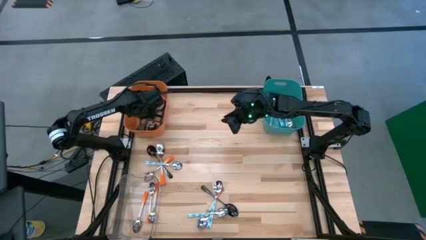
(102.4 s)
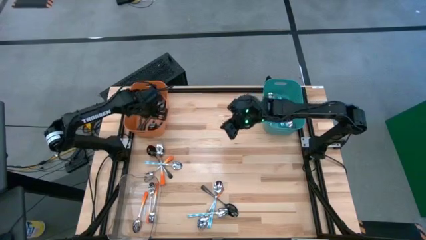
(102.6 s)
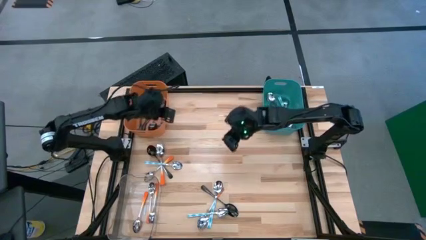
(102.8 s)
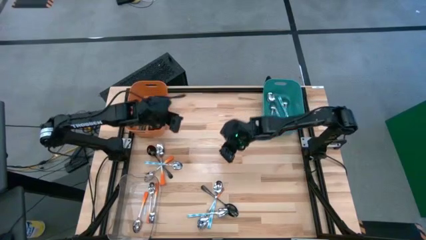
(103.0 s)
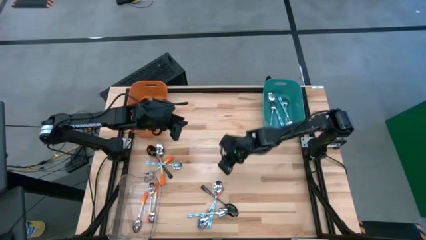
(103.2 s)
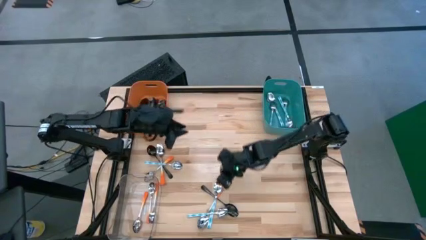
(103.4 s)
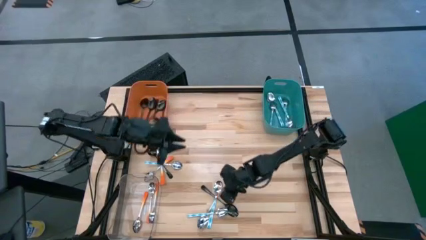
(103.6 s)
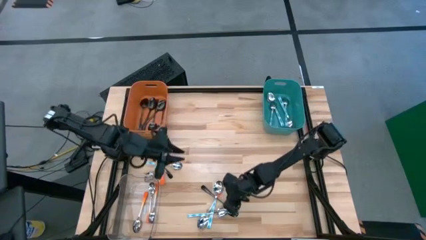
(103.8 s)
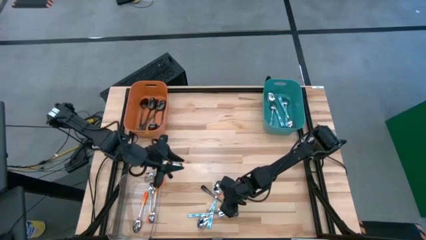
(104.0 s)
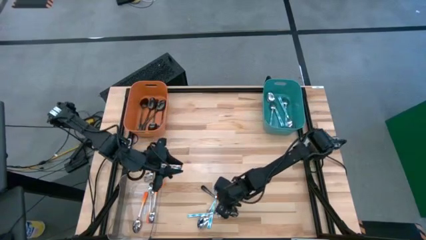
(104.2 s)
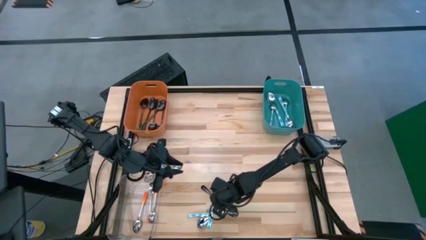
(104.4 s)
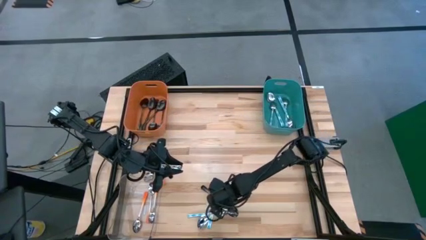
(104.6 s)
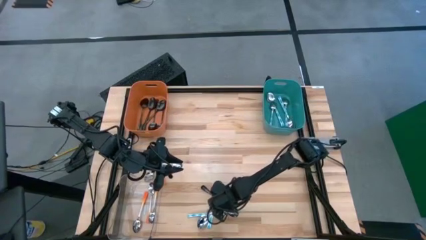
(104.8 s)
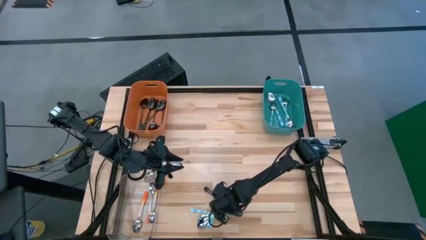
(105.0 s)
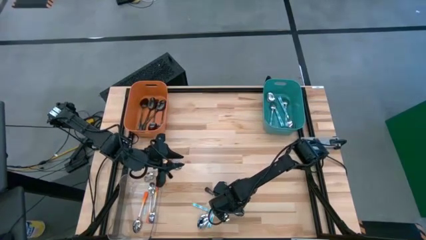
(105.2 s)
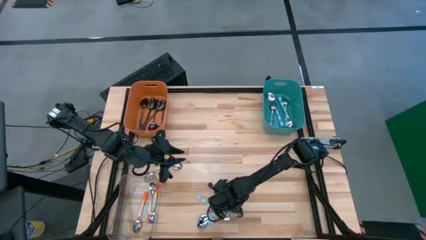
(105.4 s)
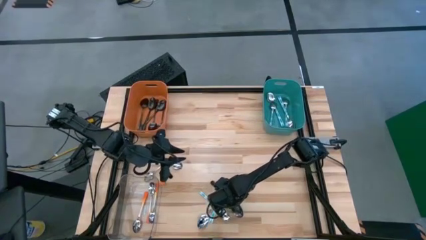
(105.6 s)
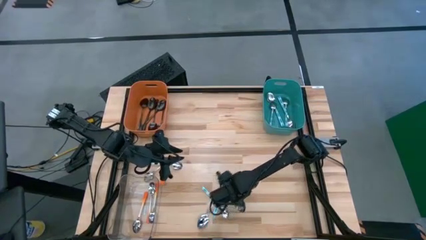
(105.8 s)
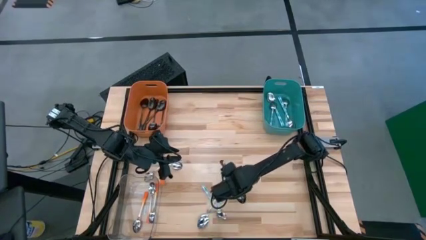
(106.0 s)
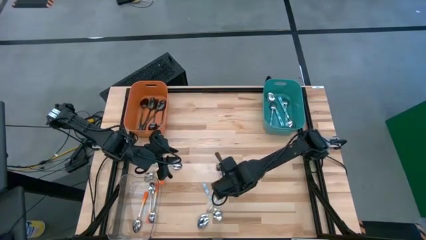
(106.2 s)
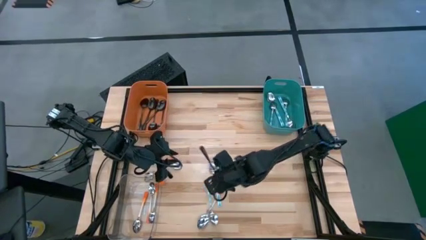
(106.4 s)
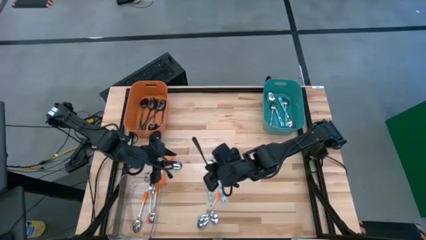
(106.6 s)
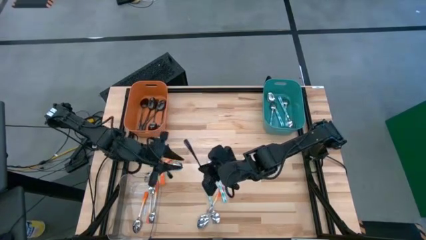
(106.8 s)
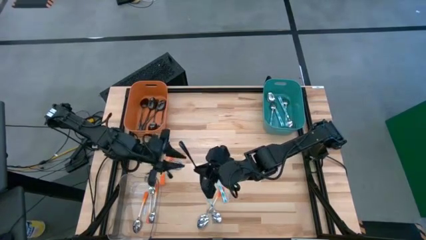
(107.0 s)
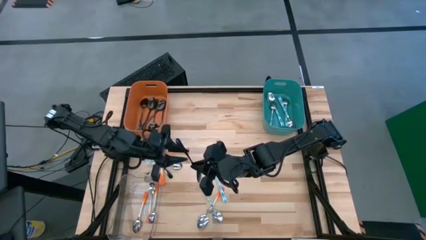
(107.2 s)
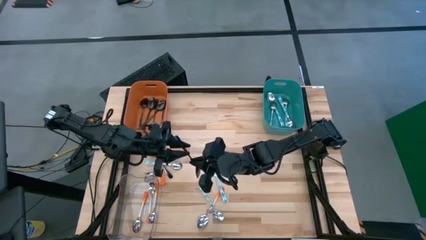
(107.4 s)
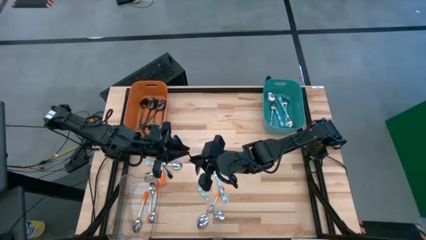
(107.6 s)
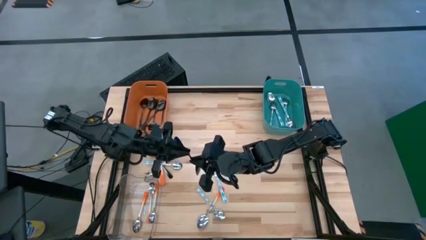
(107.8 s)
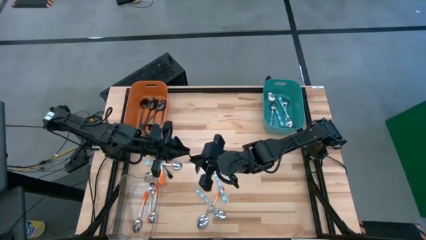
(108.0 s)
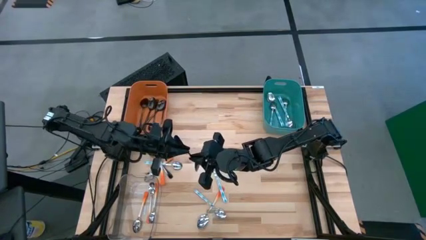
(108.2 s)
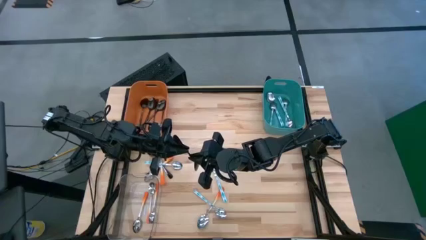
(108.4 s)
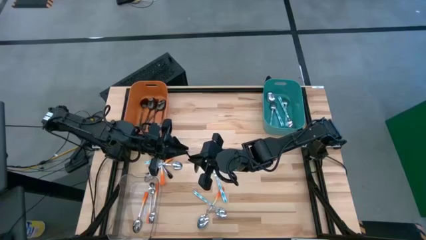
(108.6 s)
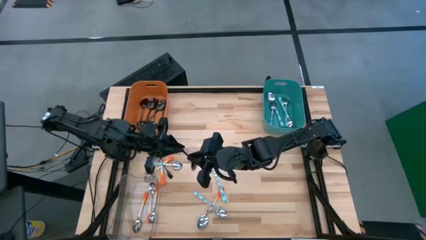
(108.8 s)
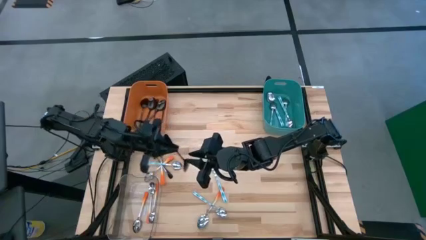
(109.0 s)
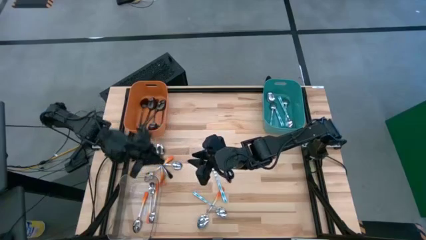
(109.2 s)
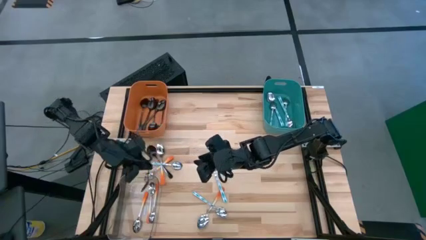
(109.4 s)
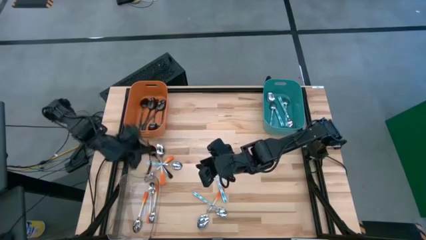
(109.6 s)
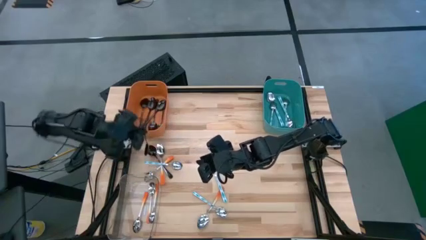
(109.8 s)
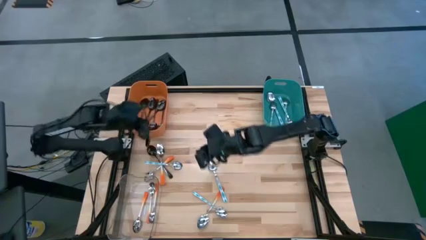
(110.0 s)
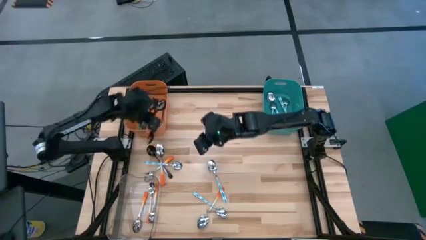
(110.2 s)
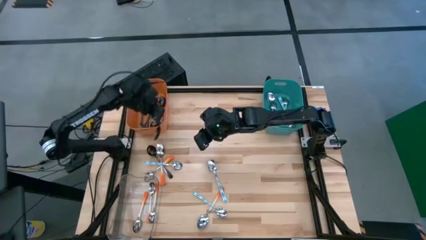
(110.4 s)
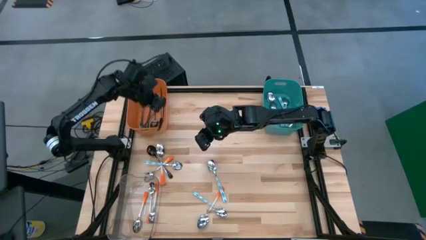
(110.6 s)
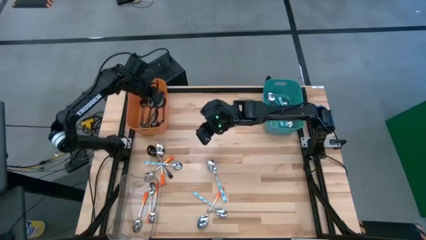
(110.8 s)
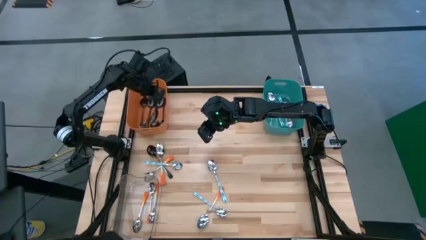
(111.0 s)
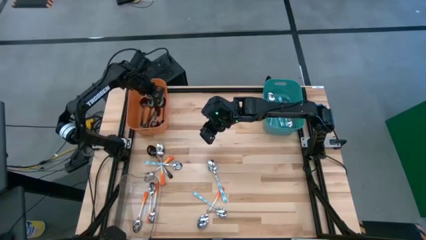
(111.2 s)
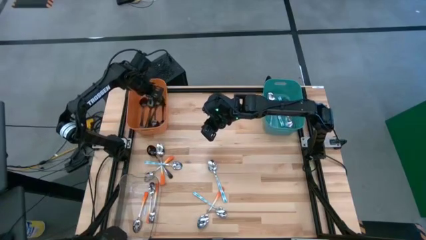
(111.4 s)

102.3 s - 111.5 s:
Task: Sort silverware by color (type)
Put the black spoon into the orange bin

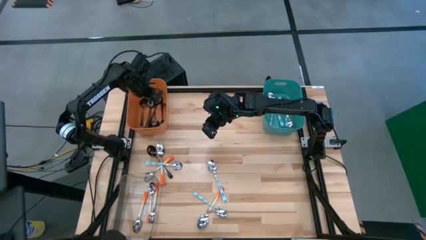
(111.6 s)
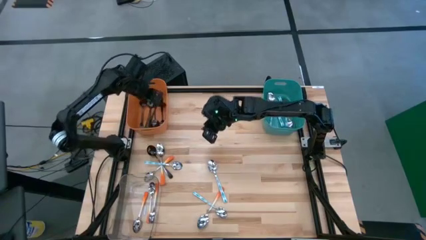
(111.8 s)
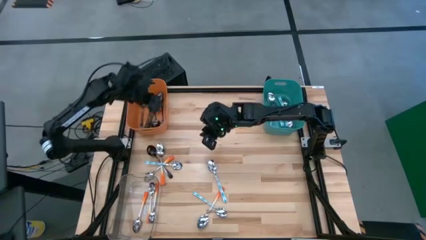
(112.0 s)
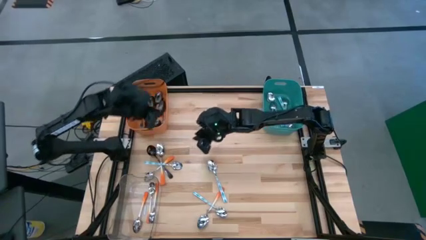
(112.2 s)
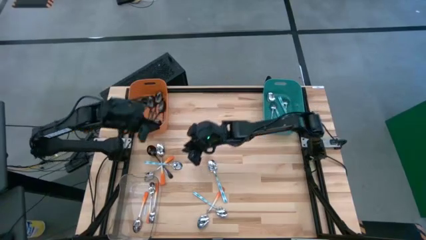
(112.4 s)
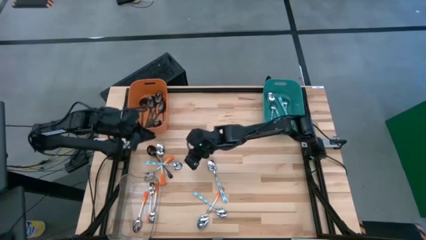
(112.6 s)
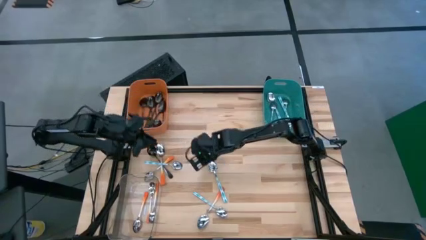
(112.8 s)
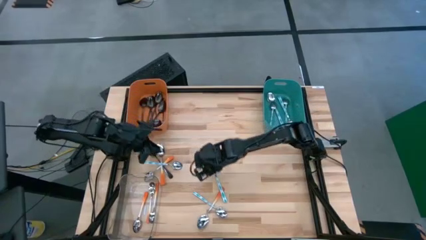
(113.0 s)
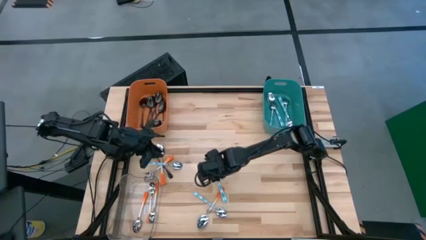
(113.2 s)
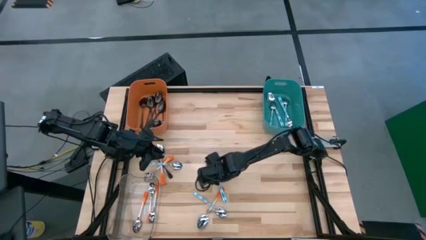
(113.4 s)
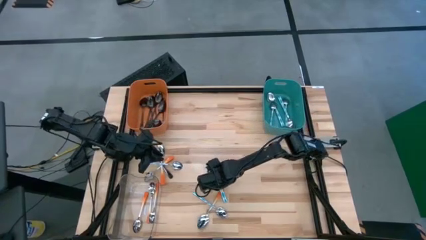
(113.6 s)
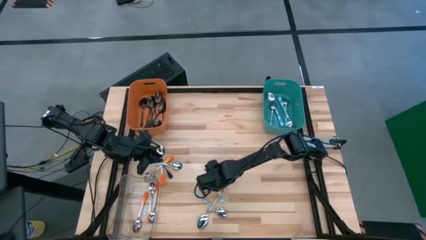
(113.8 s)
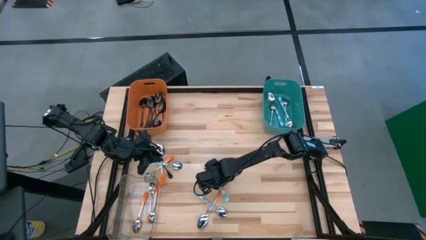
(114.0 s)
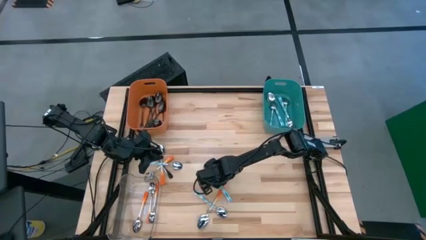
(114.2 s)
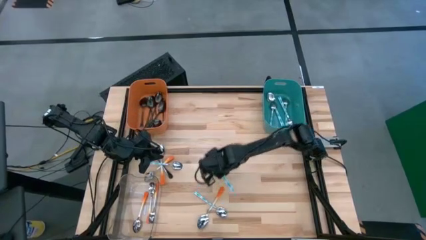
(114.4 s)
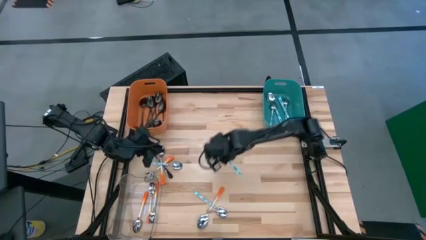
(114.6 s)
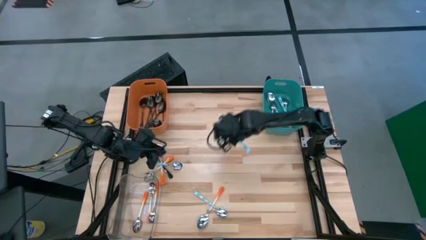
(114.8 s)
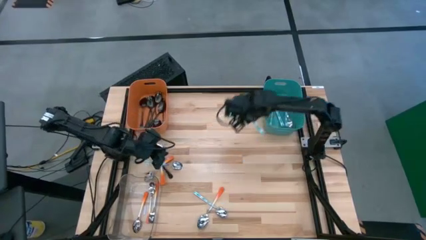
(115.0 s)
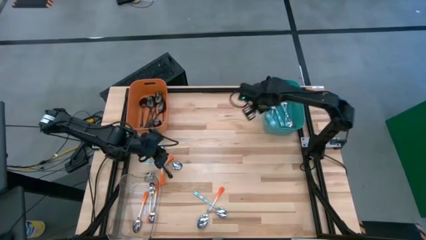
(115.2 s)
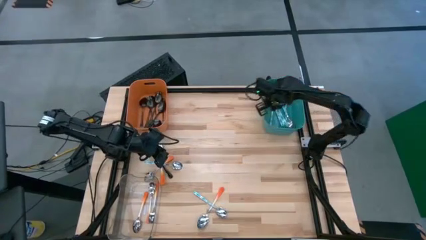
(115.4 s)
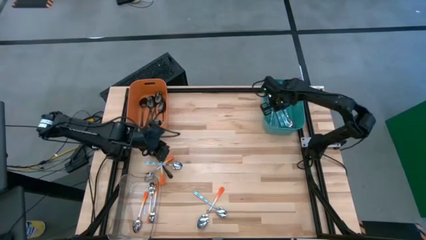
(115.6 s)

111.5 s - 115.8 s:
Put the blue patterned spoon into the blue bin

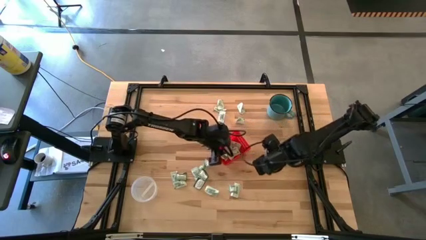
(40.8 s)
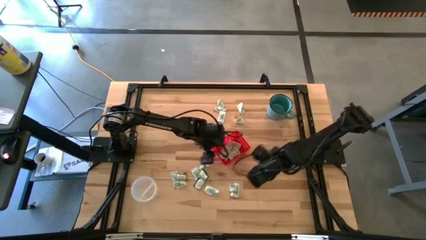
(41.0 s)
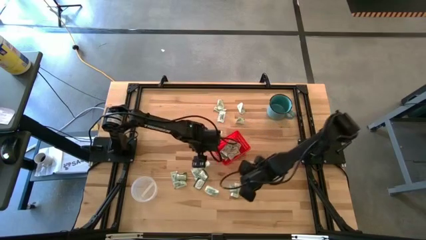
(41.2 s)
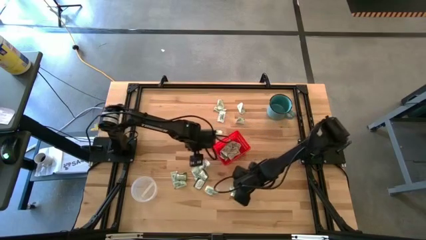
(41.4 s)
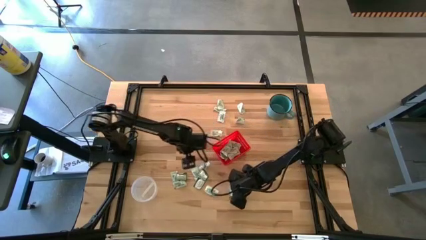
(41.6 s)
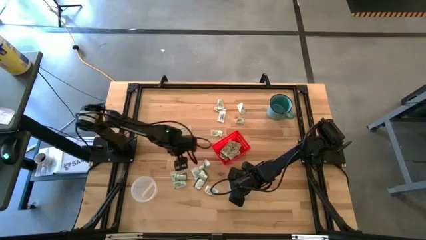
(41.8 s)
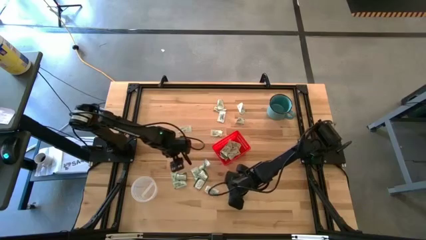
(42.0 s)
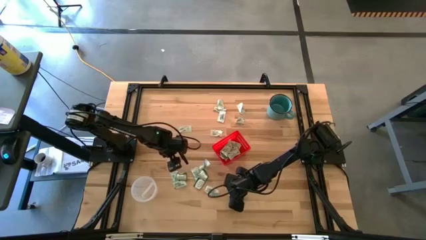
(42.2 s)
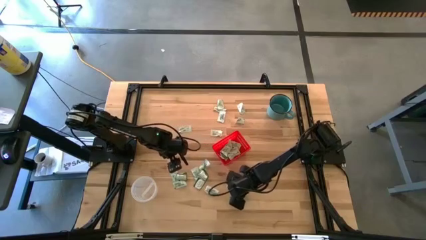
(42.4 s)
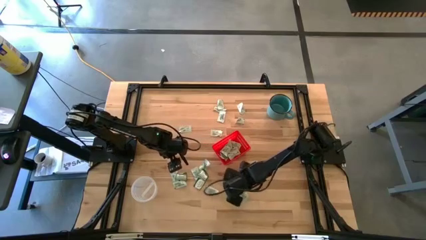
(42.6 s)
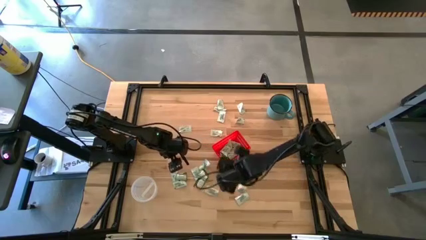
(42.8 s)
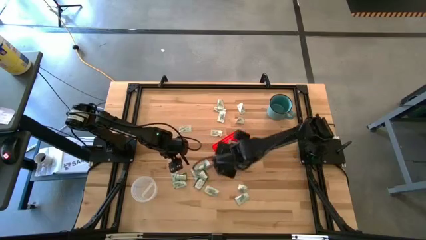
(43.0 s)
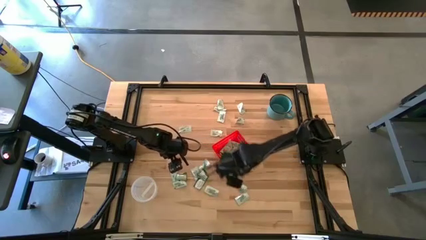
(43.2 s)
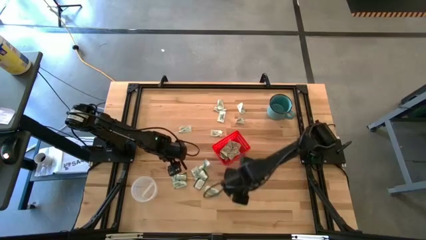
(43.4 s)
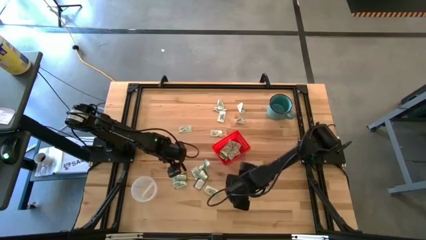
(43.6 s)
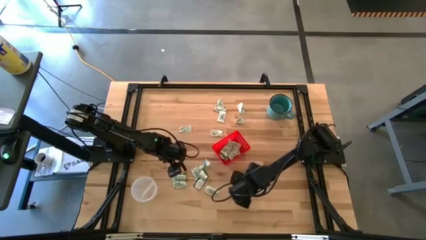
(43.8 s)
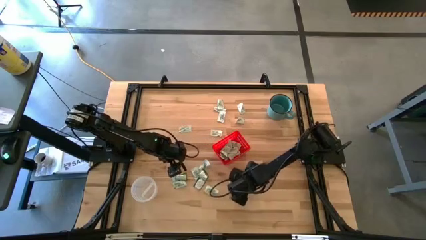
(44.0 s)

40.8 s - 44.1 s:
Task: Pick and place items into bin
Put the white stevia pack into the red bin

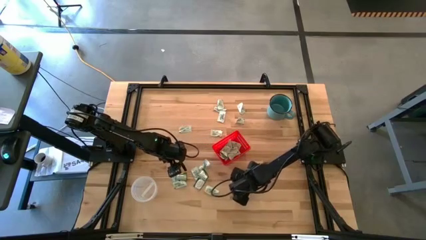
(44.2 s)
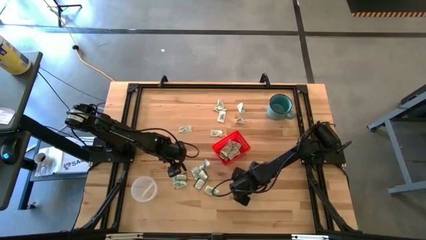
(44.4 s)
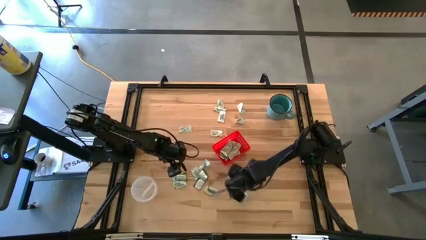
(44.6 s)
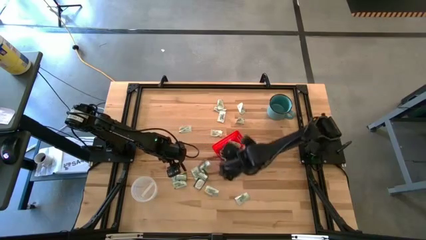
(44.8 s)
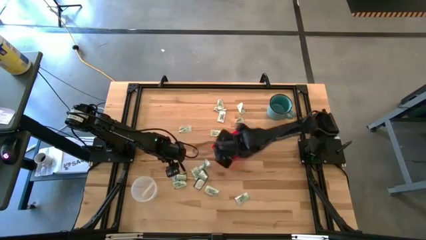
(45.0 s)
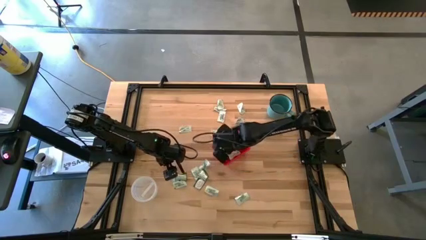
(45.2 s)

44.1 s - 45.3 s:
Put the white stevia pack into the red bin
